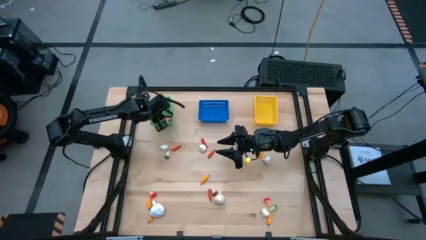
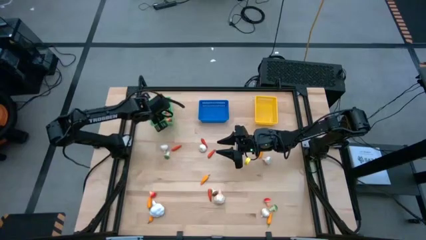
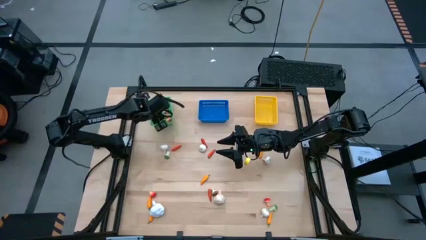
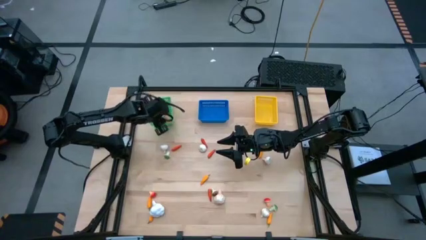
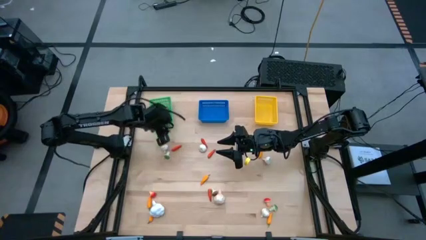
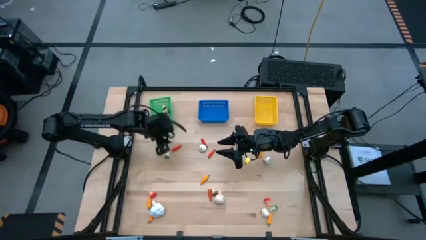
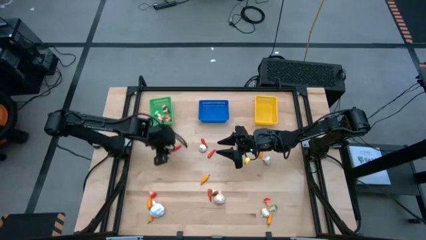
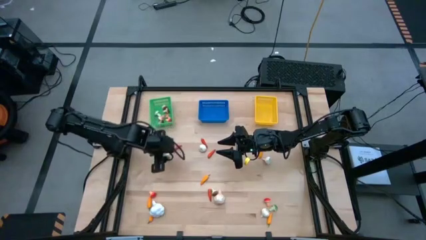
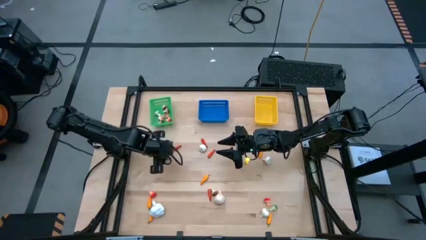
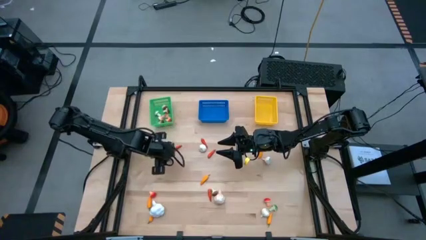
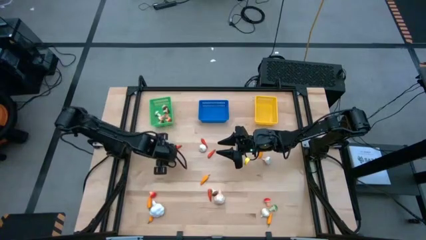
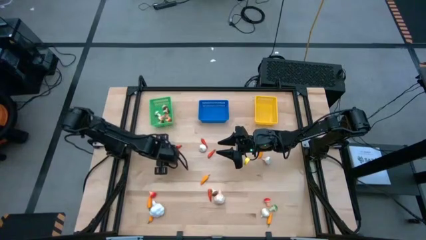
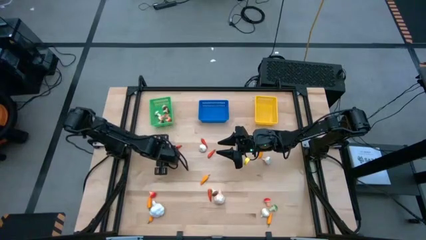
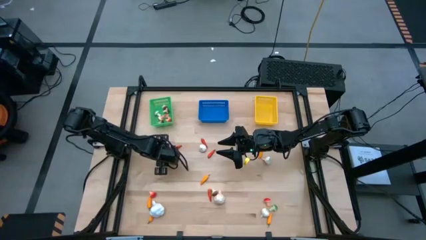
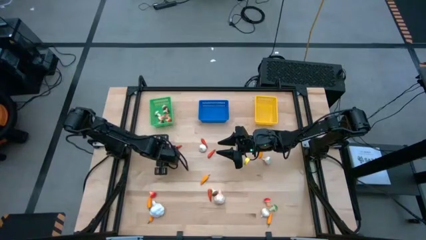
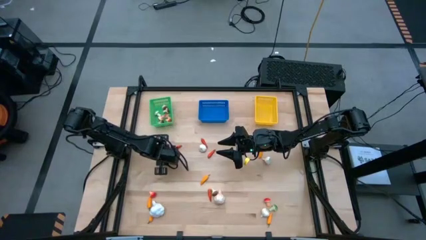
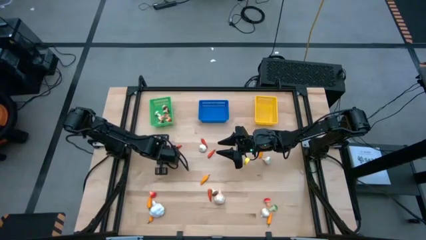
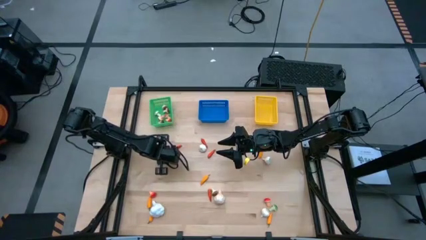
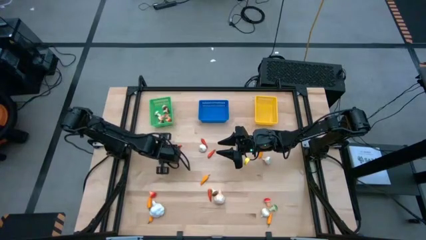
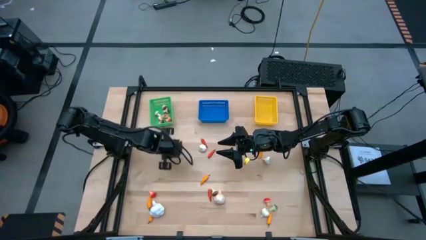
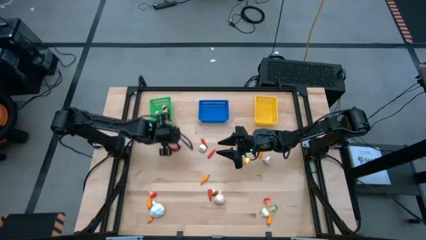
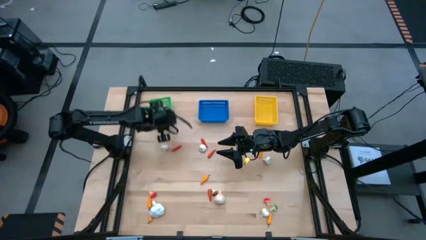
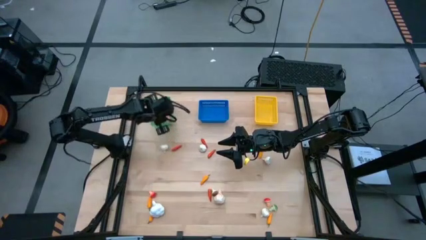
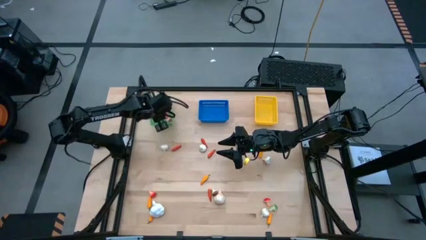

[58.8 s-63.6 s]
Task: Sort produce into baskets
Put the green mushroom into the green bin

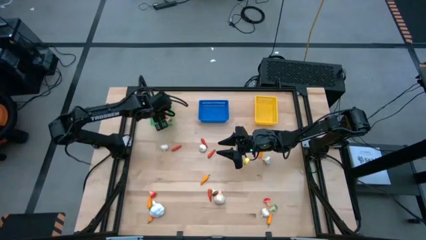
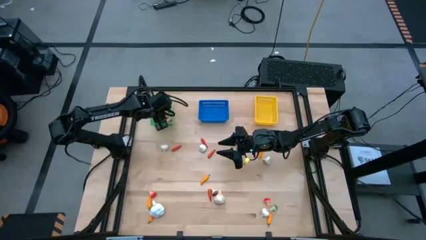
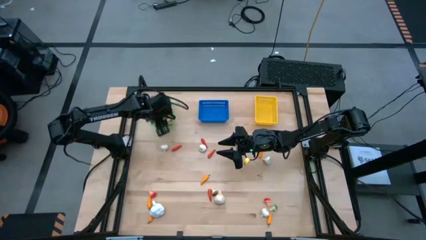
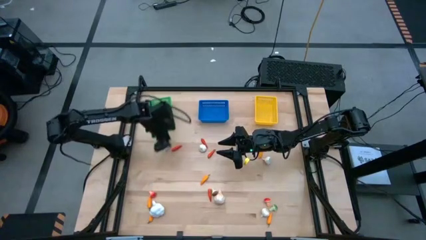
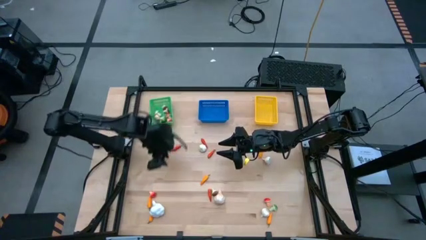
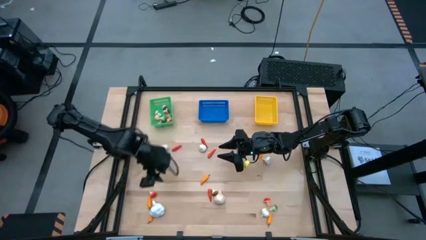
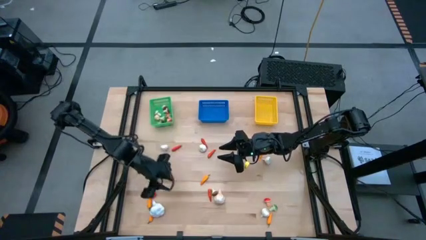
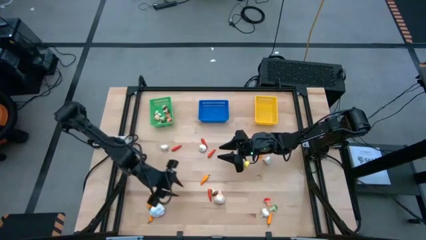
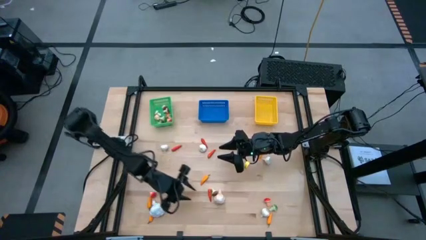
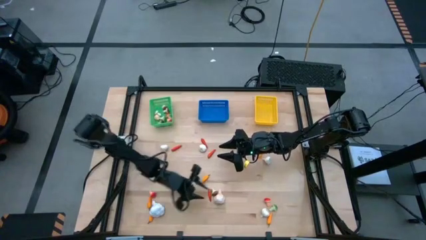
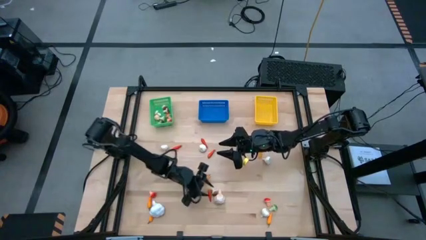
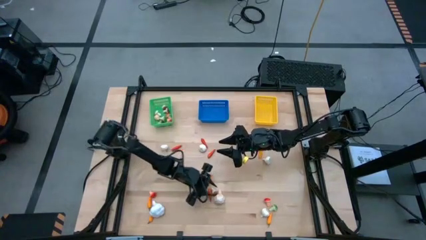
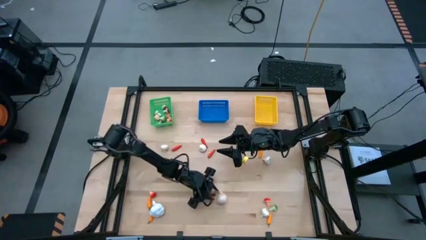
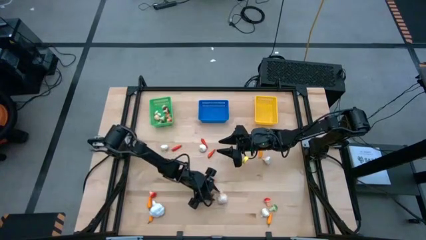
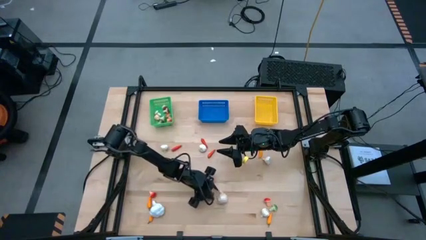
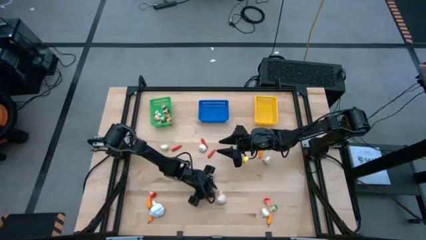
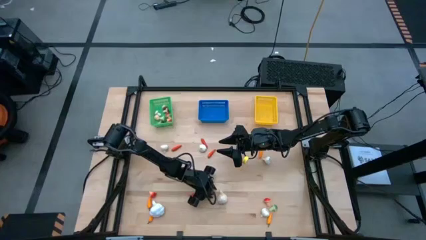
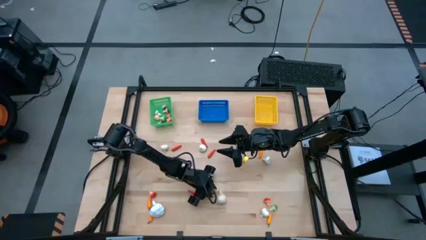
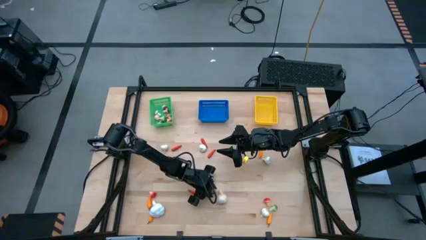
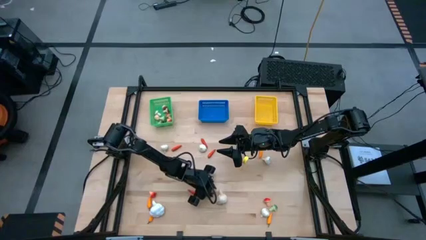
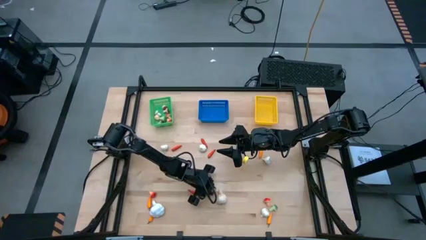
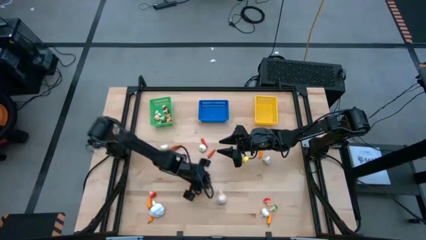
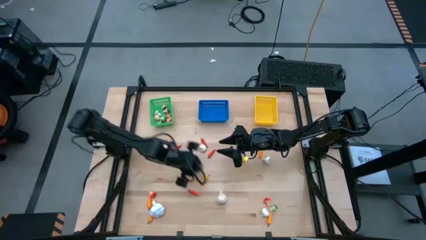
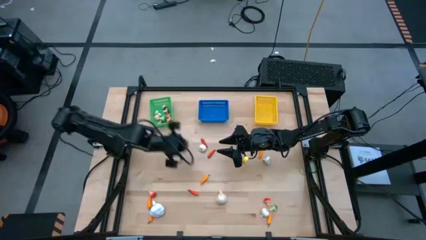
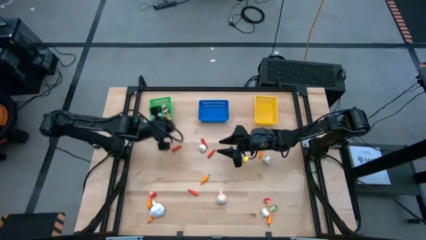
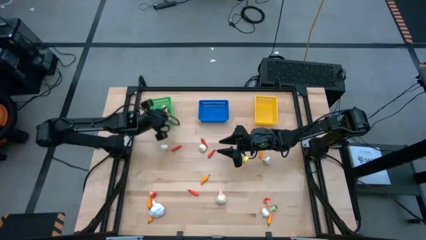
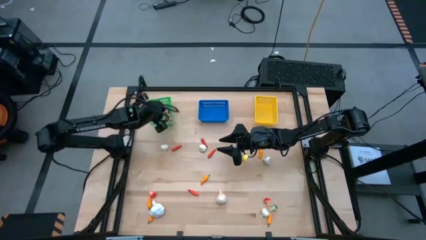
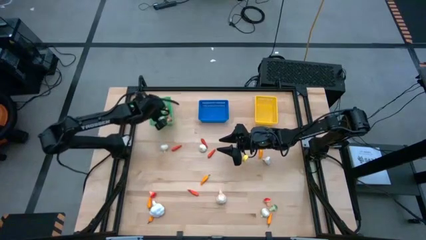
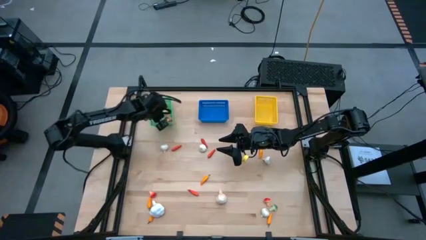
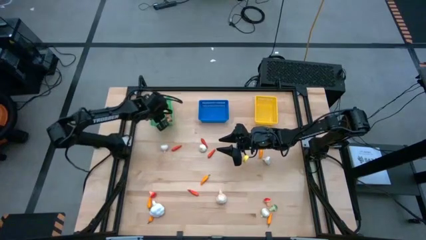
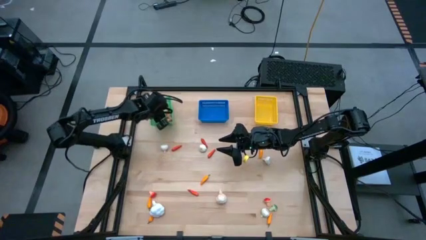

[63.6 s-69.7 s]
Put the brown mushroom into the green bin

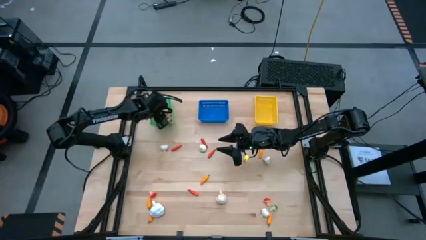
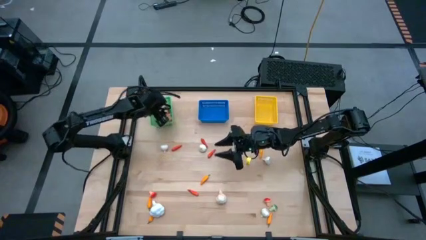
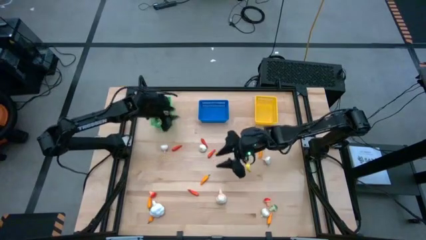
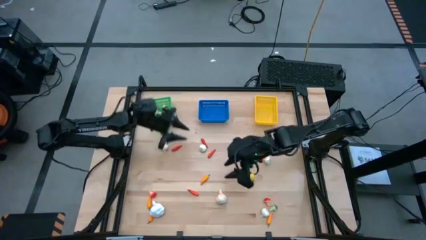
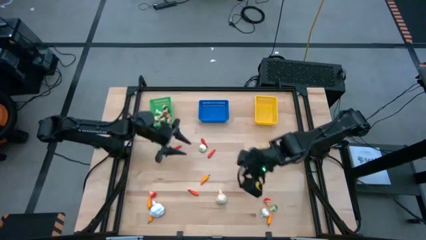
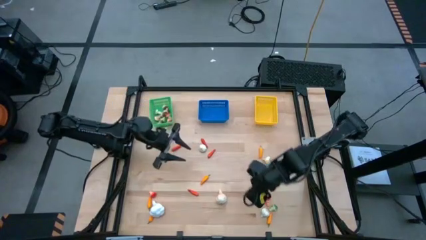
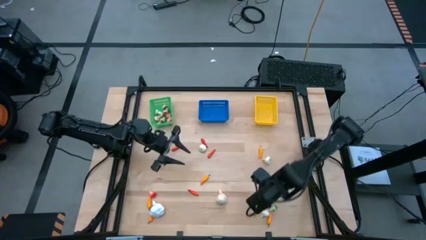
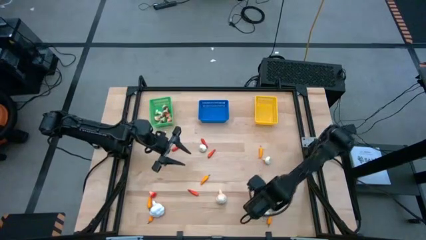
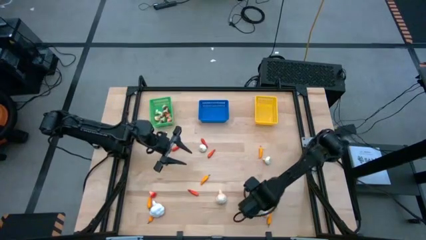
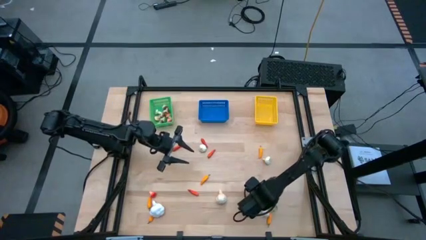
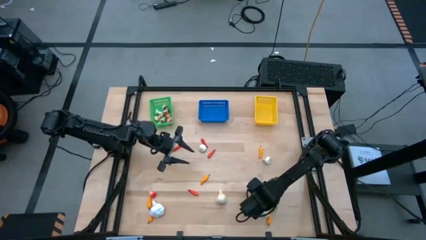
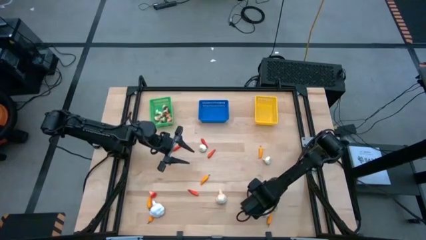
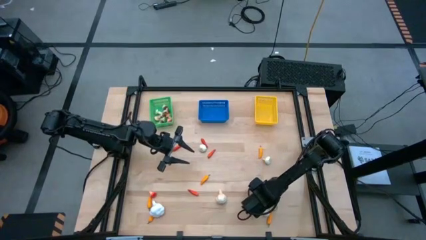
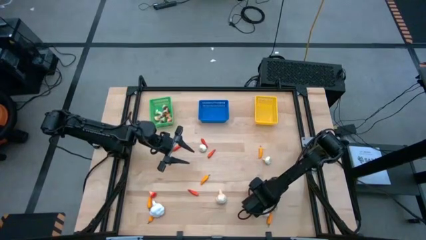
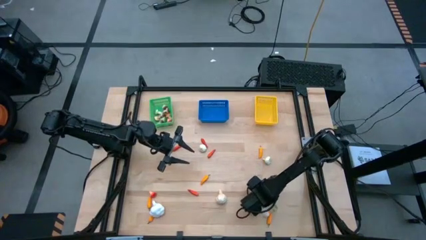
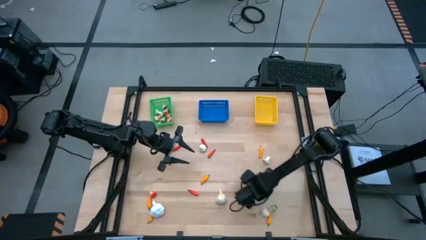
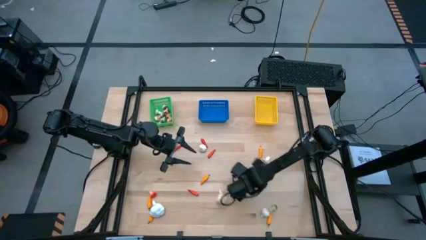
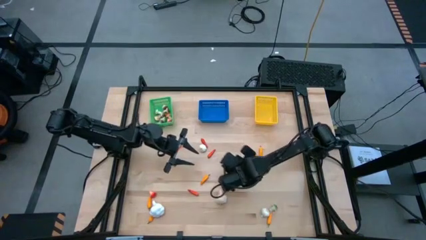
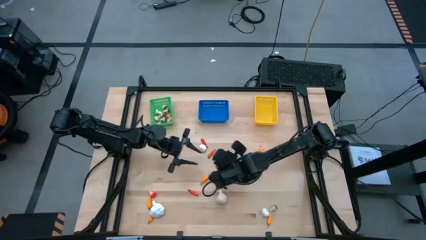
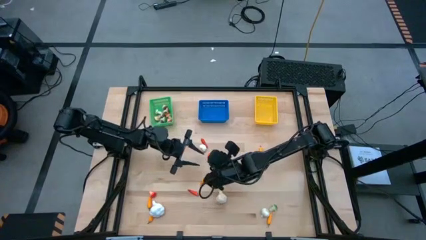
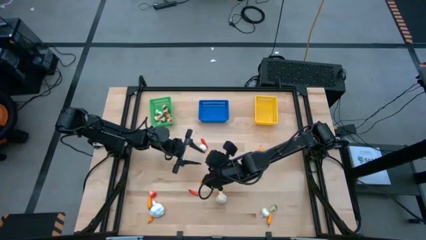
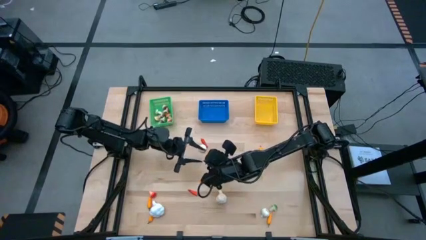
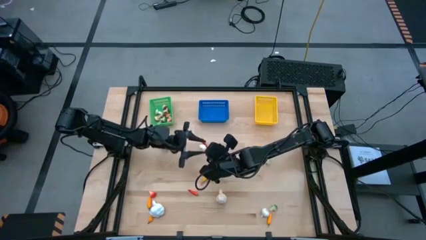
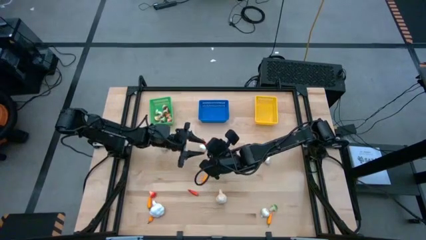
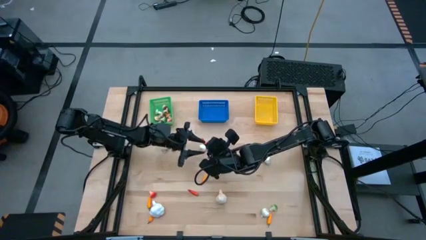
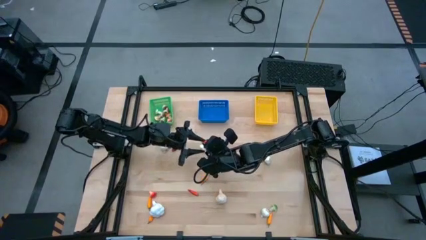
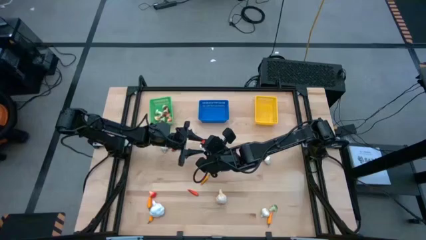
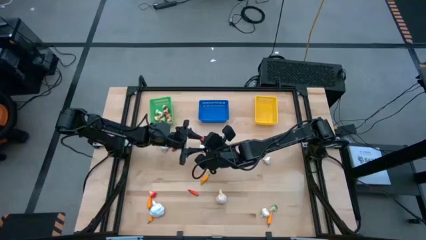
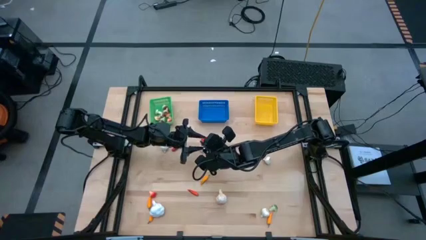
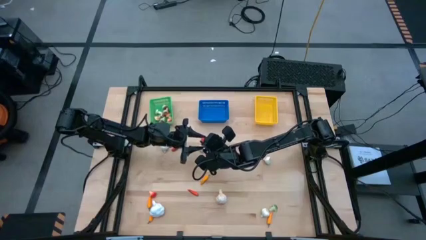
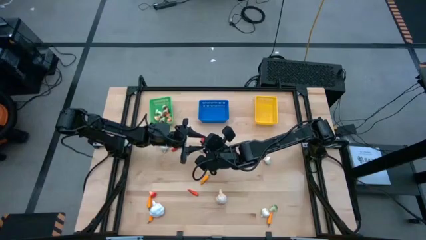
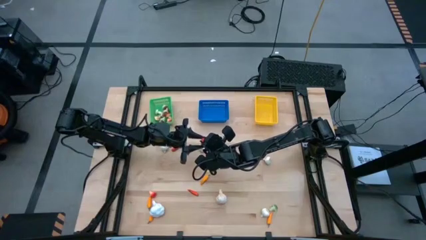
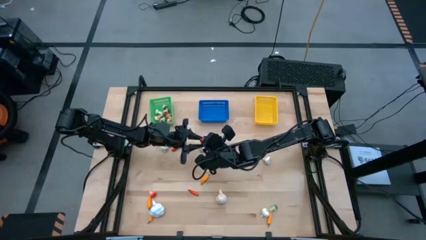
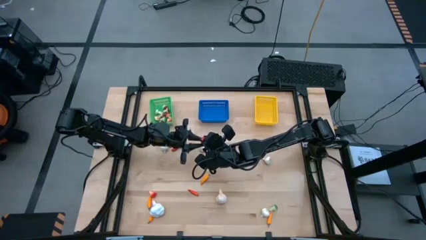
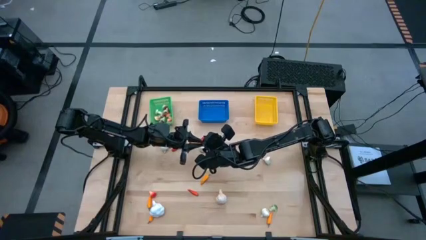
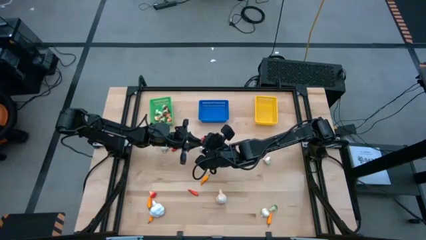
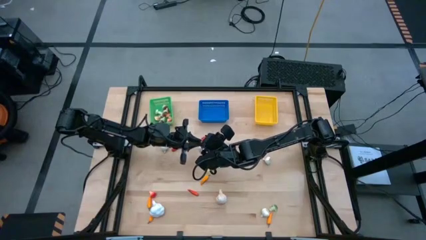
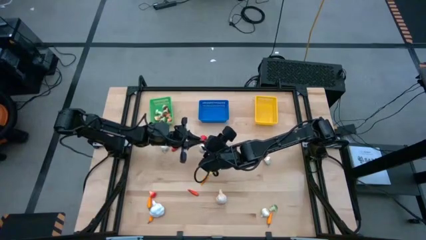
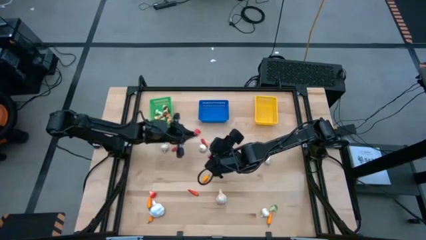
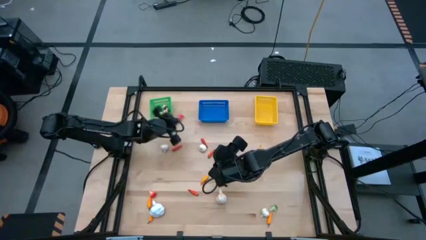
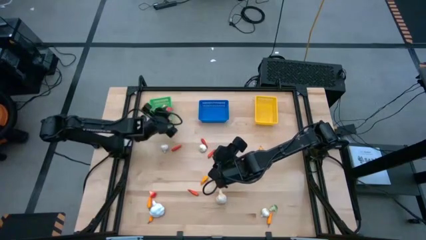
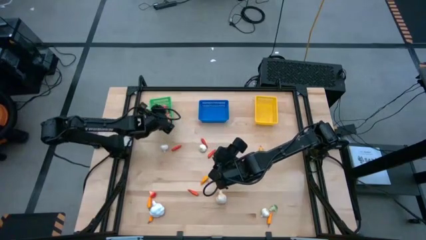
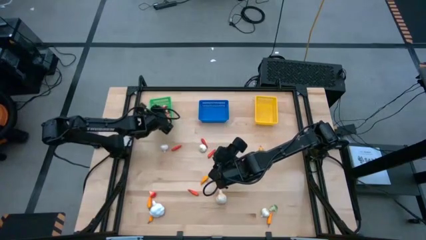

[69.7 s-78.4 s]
Put the orange mushroom into the green bin
